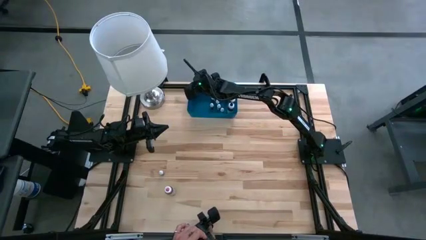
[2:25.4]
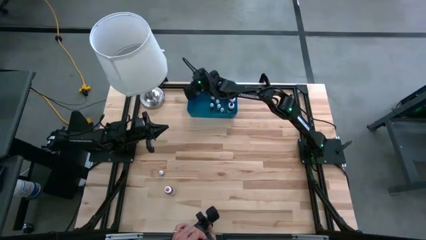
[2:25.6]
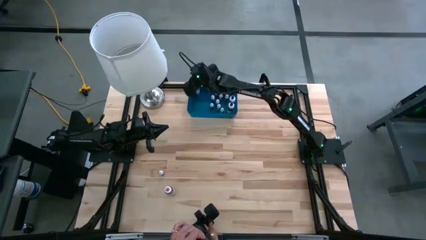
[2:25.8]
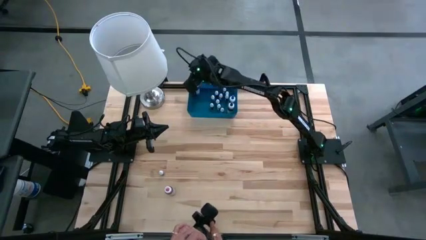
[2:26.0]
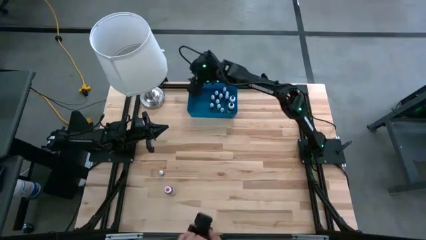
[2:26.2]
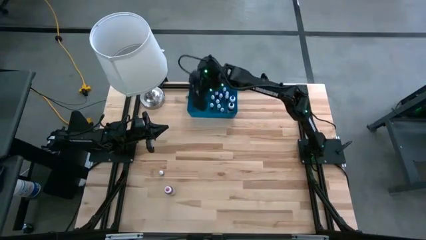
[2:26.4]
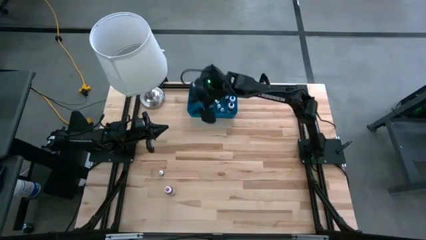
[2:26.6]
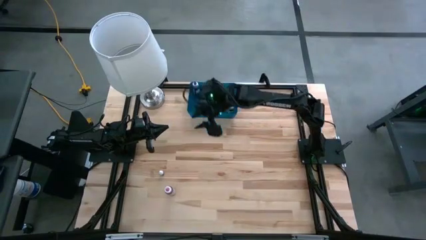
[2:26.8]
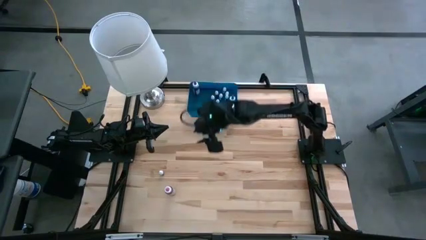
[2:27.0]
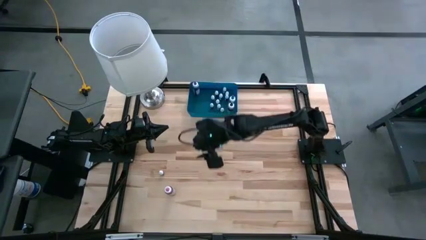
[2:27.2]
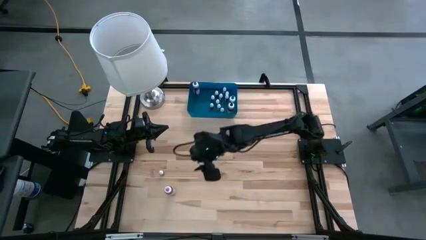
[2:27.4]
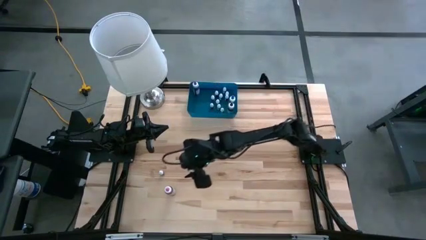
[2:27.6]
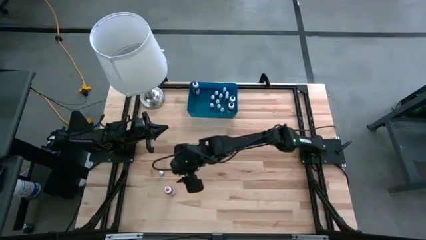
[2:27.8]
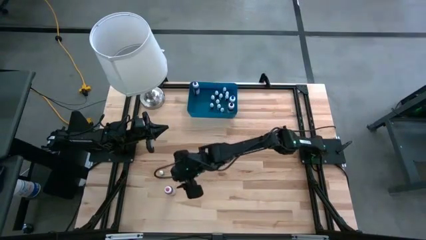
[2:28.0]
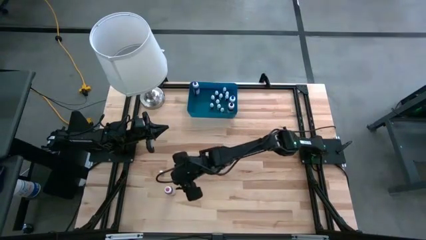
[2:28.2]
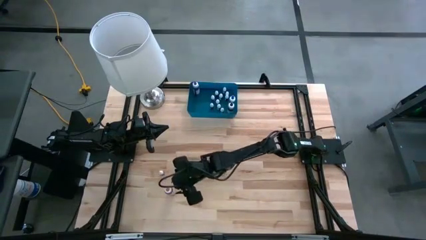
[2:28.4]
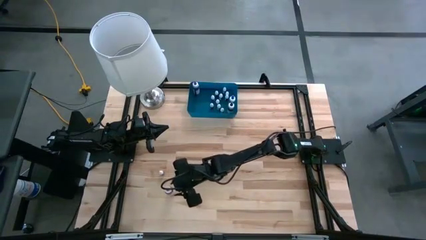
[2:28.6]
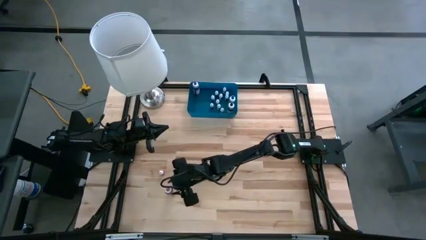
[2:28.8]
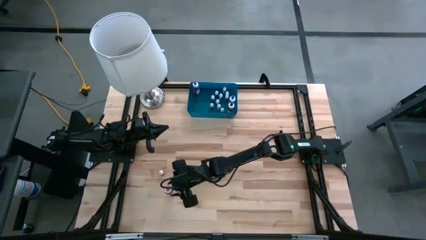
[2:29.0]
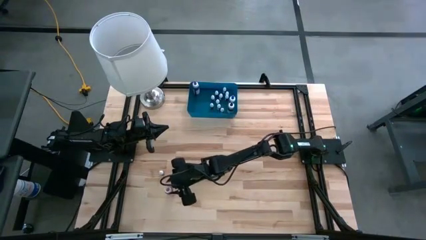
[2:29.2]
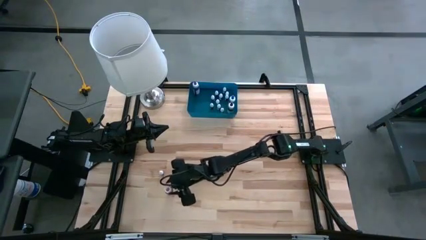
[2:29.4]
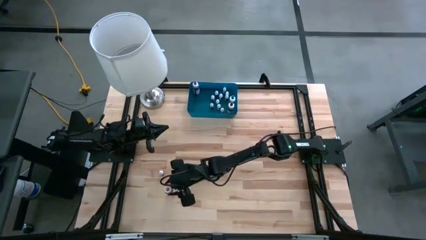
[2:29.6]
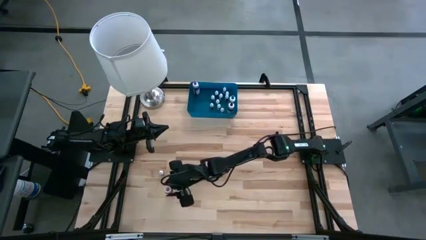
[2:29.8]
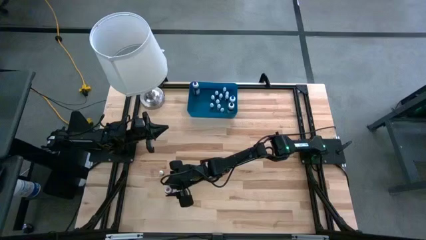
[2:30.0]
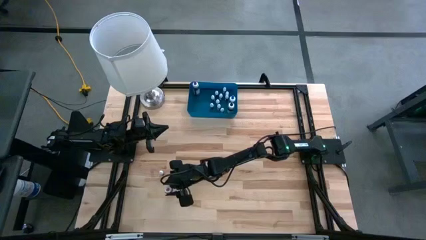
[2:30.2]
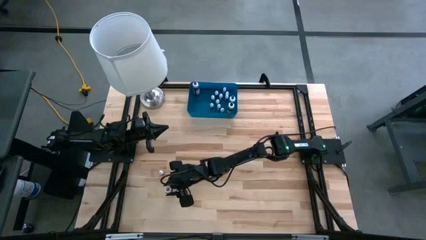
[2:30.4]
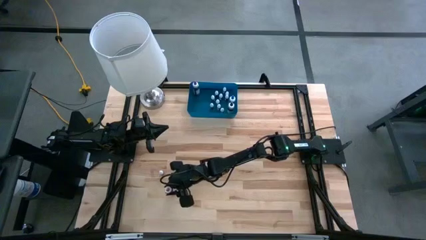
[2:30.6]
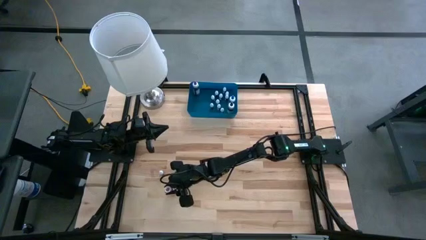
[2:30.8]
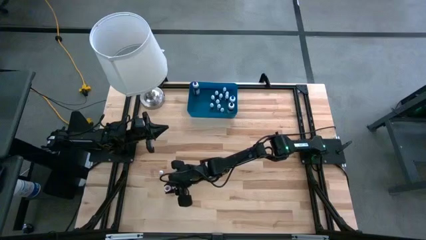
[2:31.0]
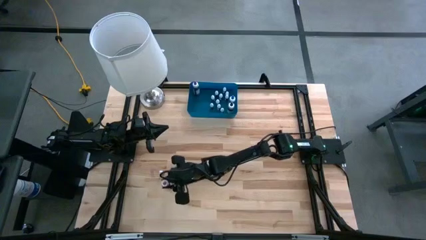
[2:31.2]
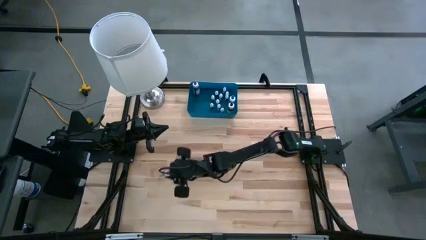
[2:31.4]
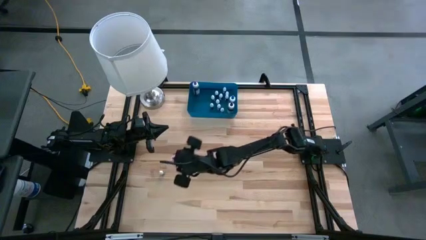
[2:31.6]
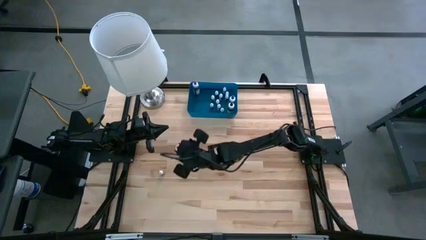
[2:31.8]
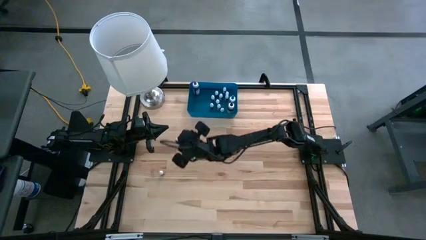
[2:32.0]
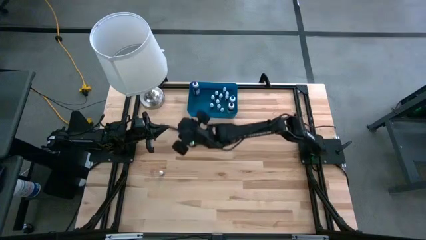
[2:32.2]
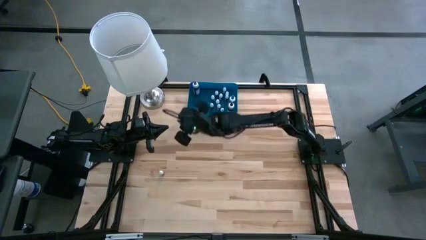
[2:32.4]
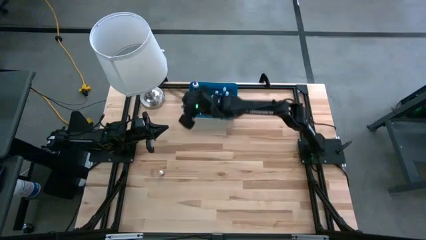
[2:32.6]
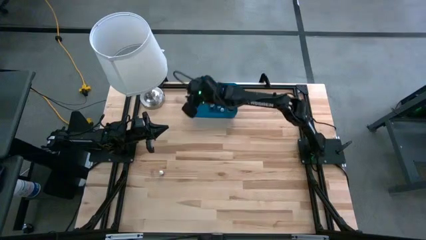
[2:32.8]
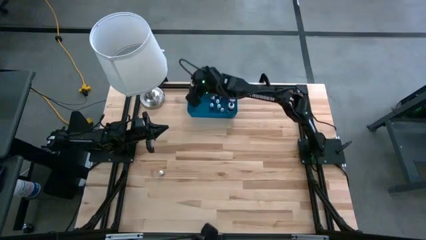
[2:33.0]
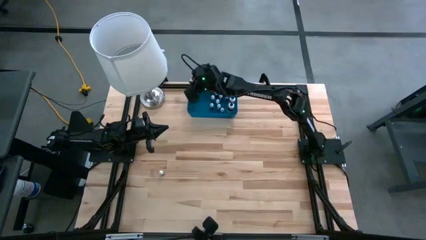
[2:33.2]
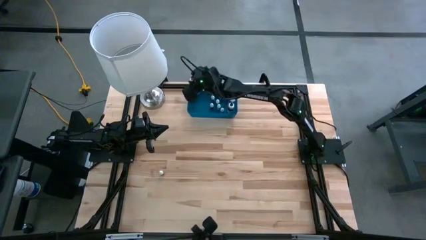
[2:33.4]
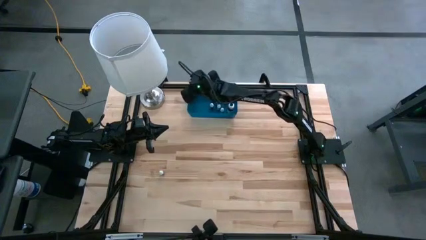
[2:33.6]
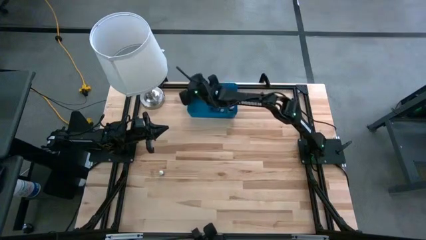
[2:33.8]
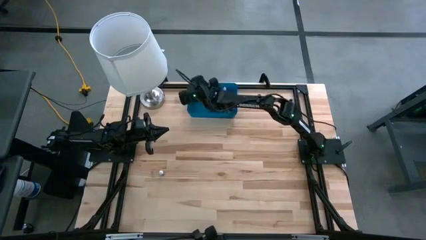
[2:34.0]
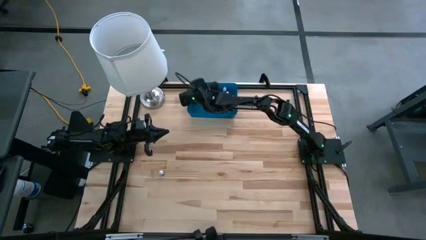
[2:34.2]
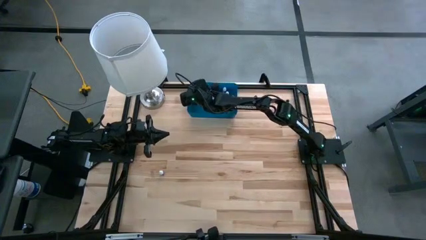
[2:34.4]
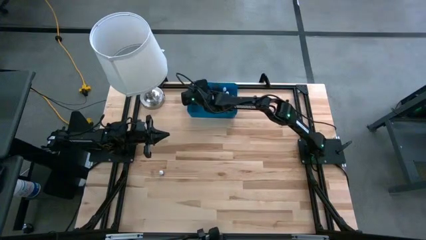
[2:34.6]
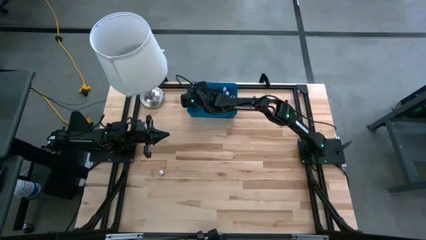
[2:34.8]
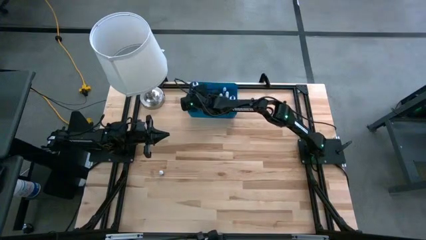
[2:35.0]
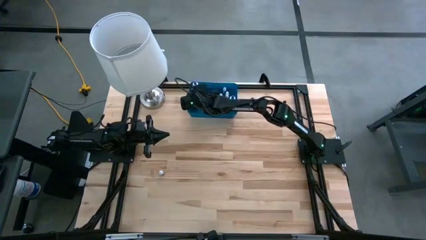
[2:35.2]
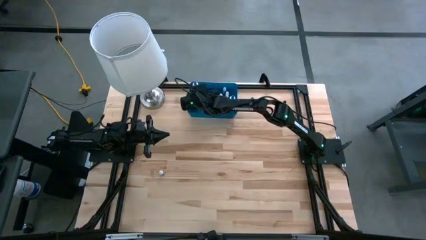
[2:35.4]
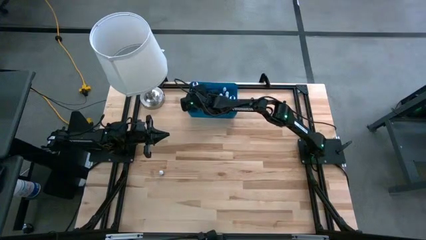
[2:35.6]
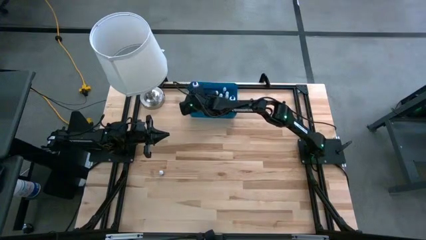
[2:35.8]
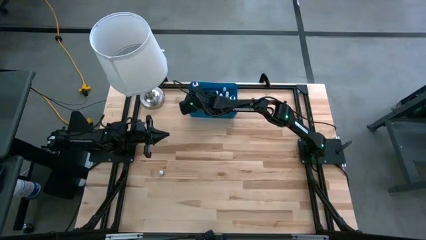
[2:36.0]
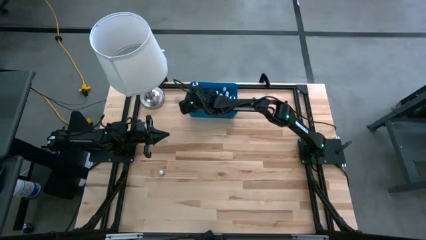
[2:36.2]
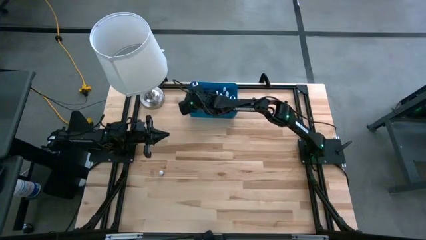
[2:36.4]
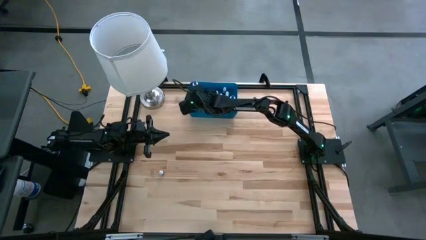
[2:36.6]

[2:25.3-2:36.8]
Task: Pick & Place food coloring
Put the red food coloring bottle into the blue bin
